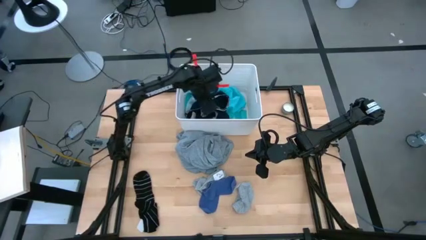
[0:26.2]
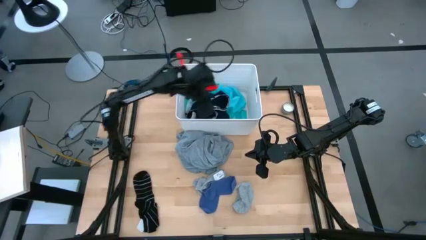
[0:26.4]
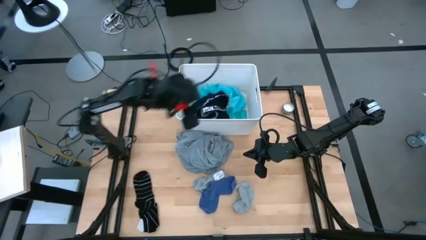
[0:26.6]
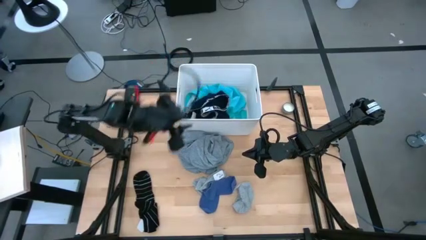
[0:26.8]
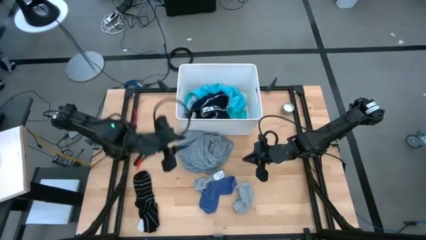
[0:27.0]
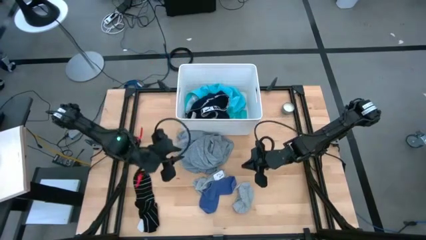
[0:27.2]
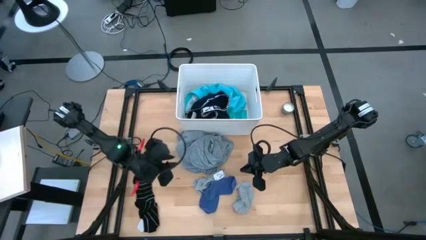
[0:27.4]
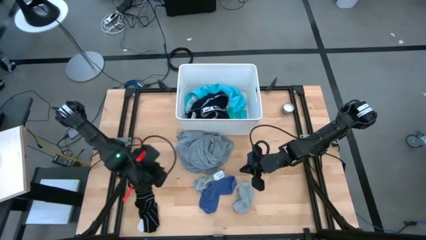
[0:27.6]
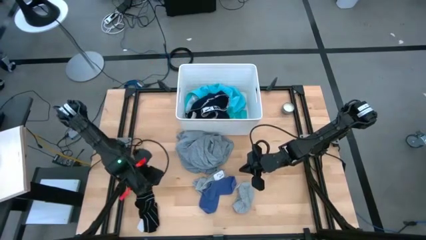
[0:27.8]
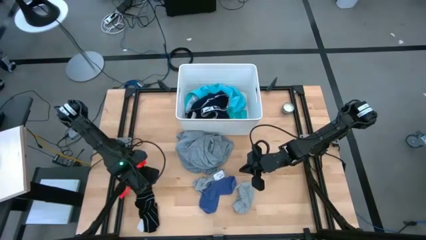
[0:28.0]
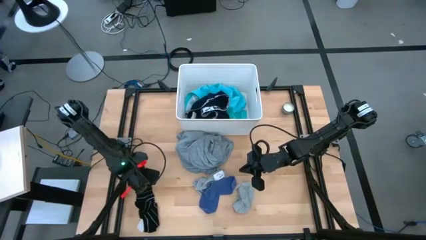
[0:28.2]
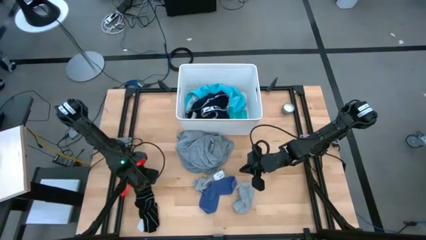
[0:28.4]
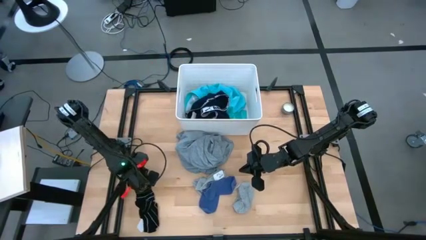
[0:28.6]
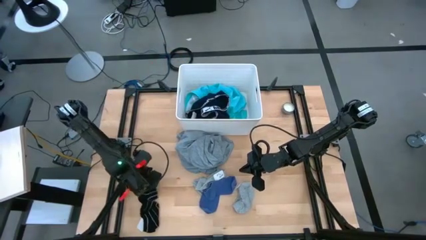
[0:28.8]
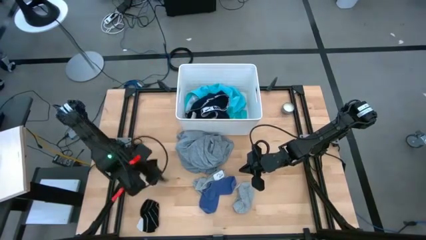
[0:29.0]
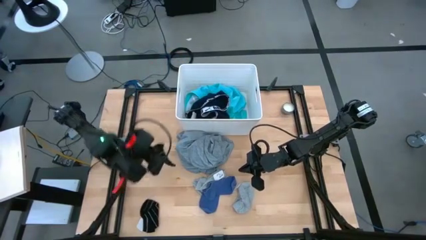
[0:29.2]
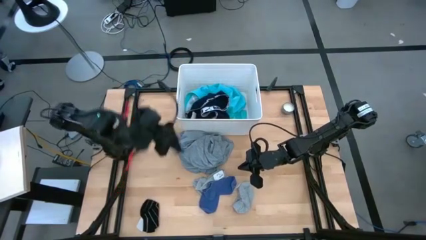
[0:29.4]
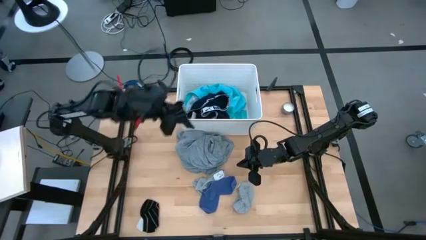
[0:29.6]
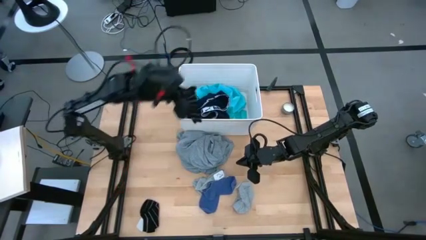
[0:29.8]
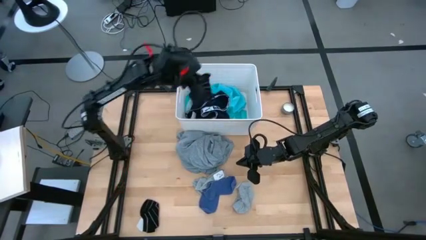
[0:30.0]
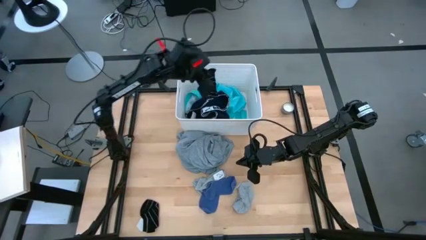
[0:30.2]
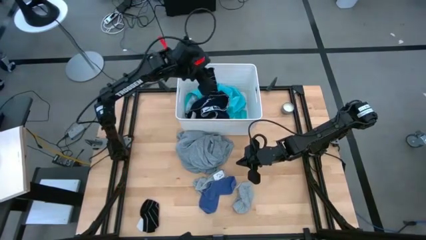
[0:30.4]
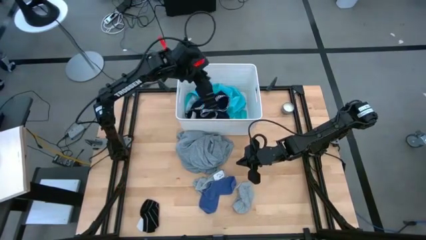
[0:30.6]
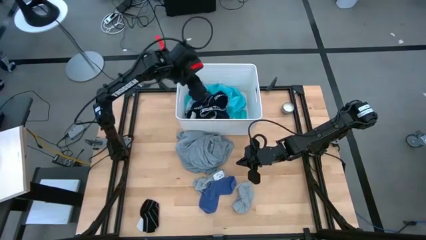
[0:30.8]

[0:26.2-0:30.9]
Task: Sort clothes
Put the black sock into the white laundry bin

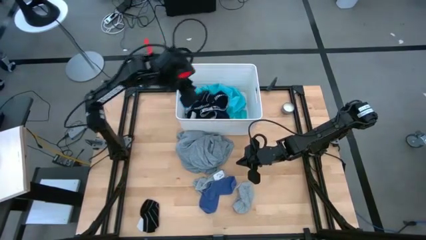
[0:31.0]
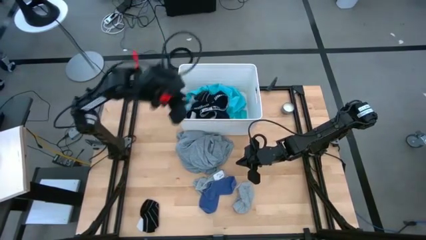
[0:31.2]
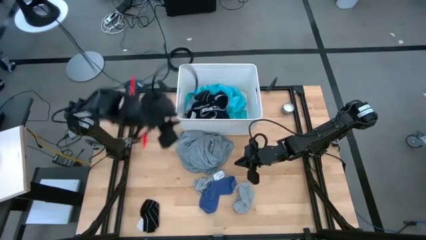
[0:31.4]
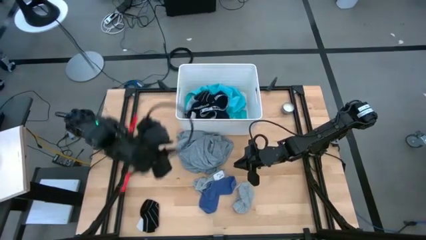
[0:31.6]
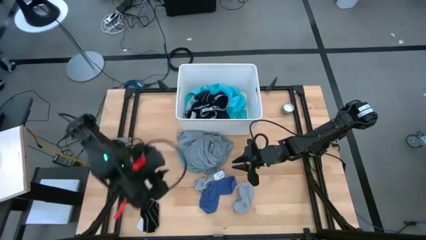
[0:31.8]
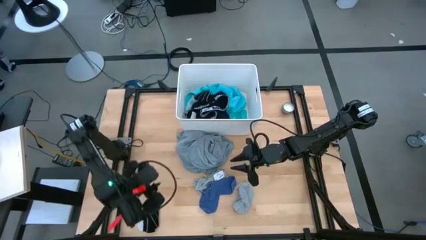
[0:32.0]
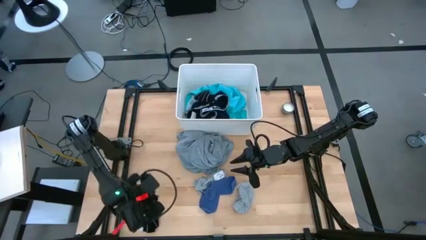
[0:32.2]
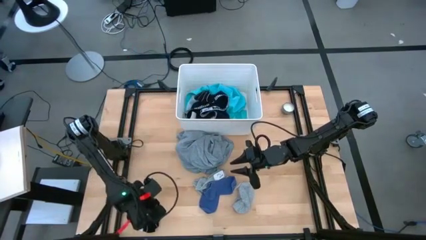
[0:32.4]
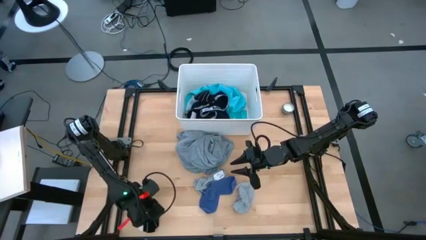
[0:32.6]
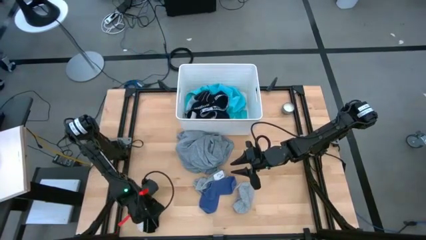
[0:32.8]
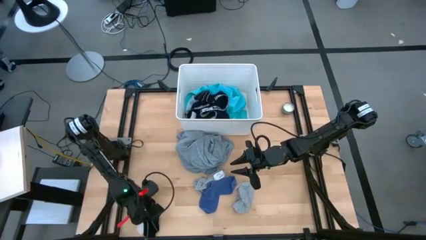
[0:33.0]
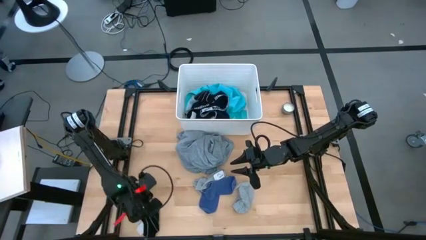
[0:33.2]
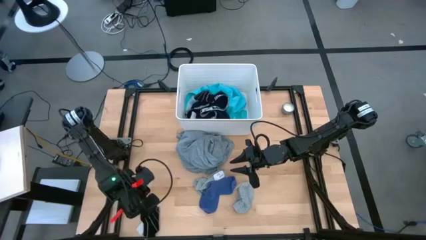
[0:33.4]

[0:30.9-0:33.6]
Put the black sock into the white laundry bin

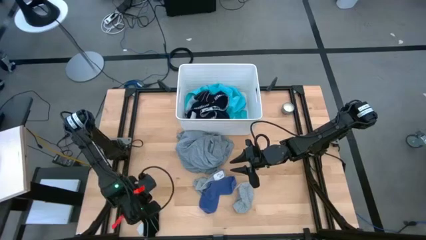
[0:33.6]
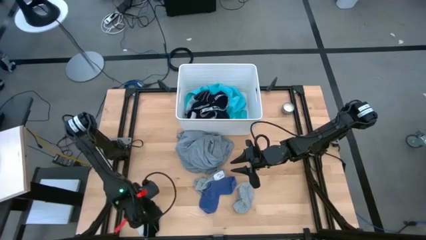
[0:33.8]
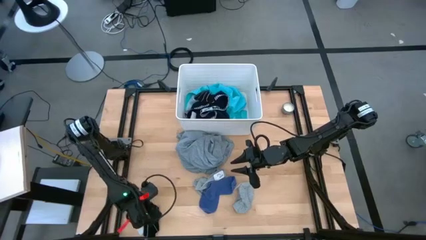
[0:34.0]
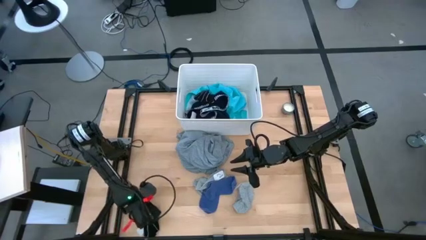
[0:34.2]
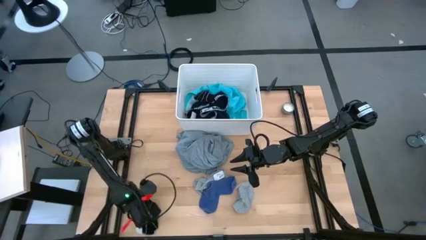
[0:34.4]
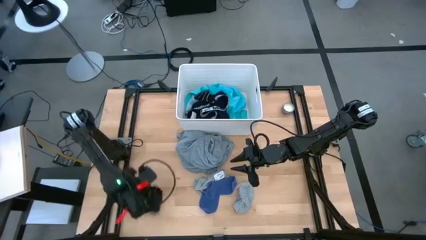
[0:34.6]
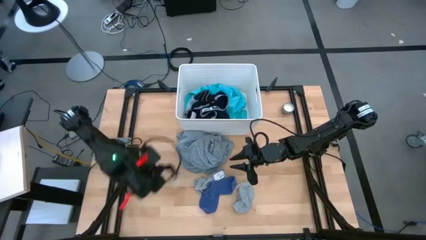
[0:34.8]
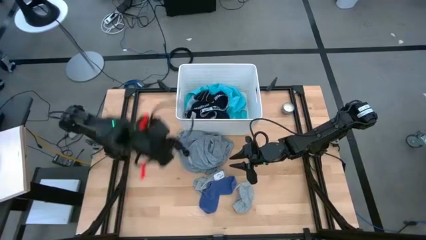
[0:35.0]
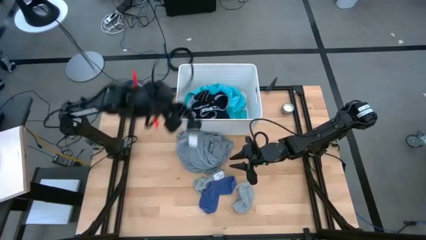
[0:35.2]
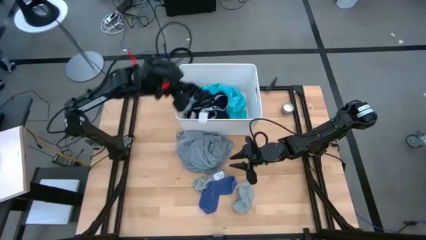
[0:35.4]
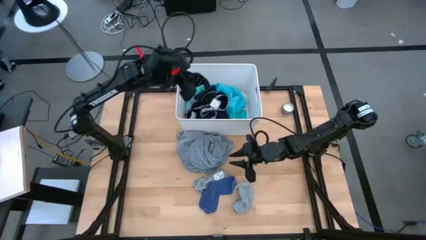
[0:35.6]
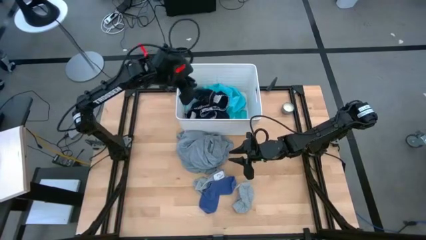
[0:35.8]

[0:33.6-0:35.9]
Put the black socks into the white laundry bin

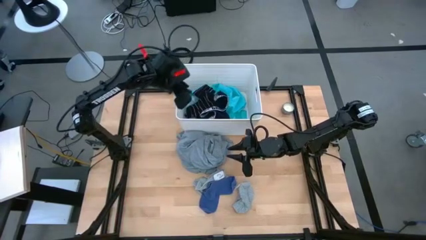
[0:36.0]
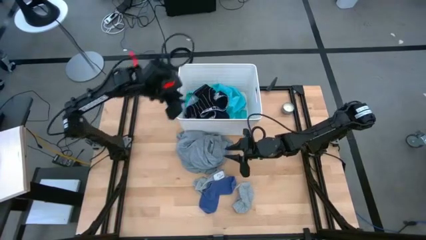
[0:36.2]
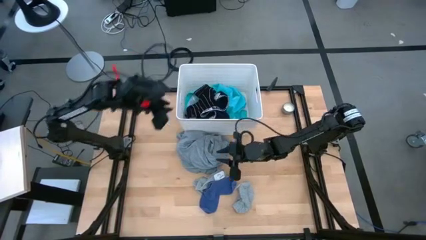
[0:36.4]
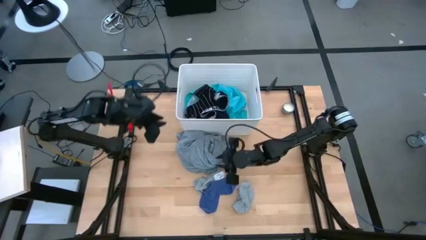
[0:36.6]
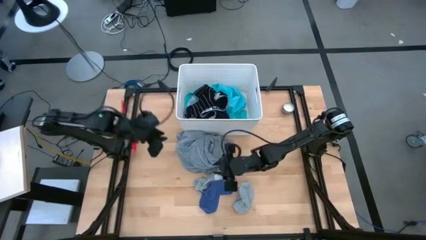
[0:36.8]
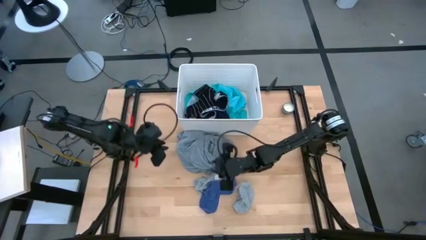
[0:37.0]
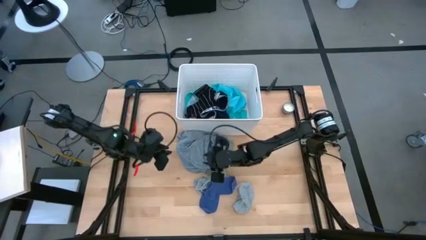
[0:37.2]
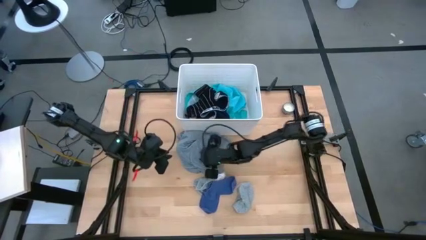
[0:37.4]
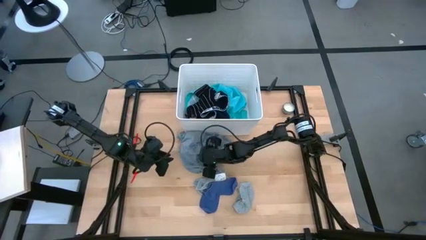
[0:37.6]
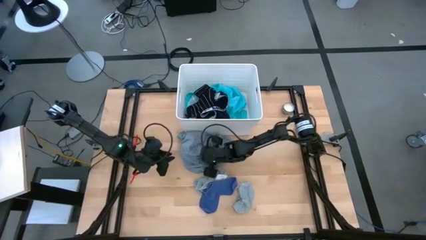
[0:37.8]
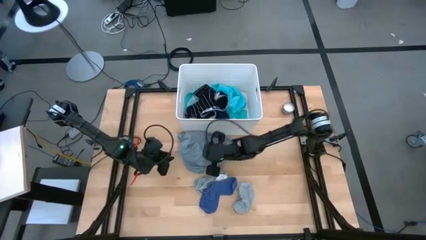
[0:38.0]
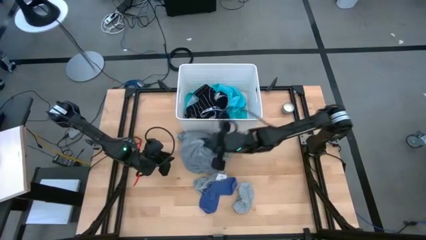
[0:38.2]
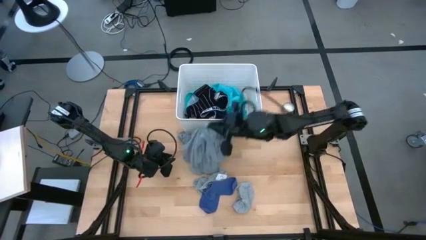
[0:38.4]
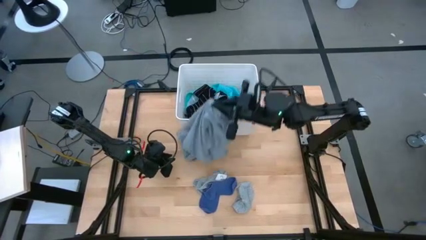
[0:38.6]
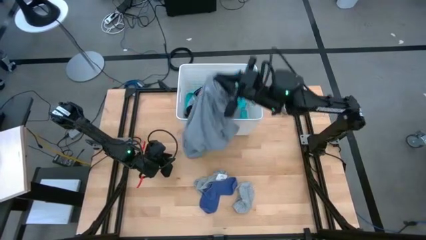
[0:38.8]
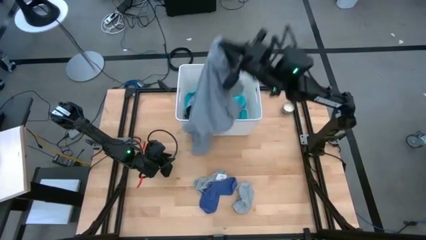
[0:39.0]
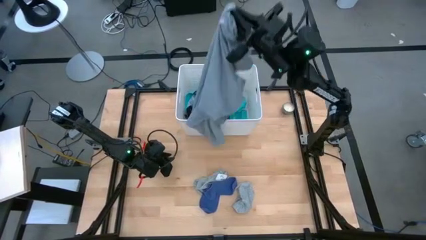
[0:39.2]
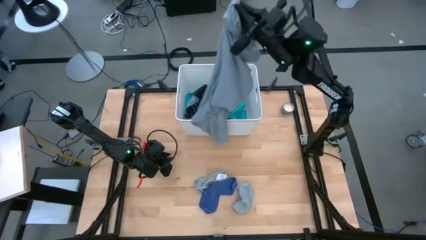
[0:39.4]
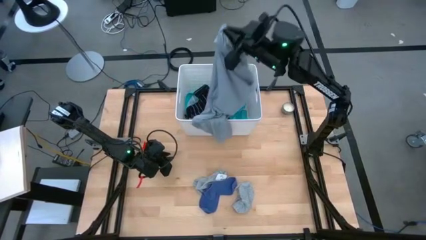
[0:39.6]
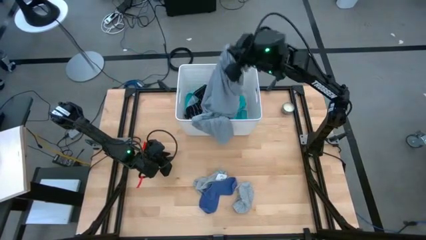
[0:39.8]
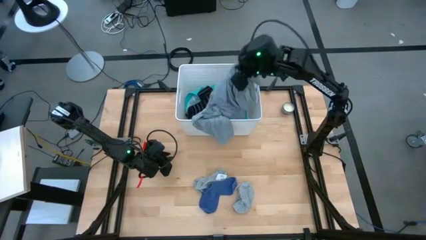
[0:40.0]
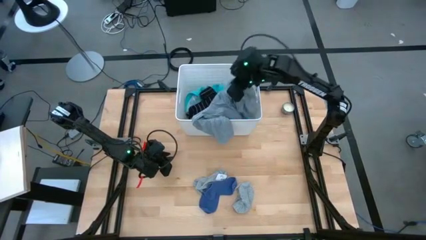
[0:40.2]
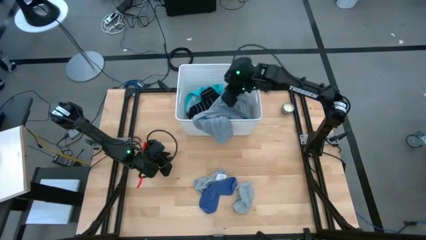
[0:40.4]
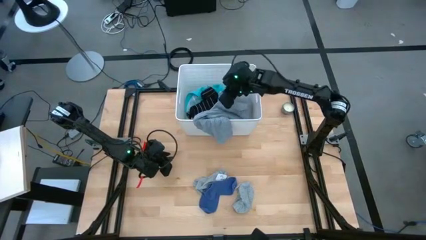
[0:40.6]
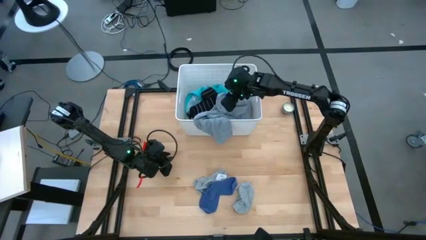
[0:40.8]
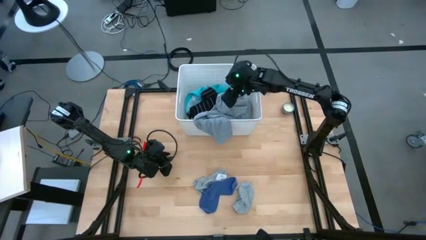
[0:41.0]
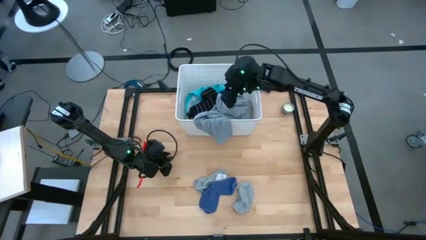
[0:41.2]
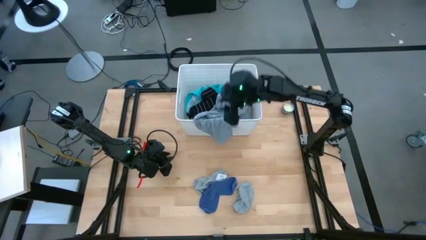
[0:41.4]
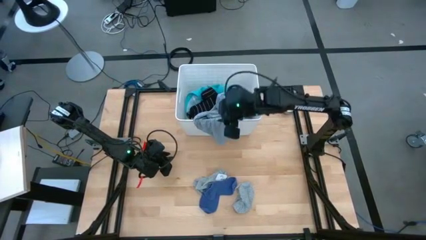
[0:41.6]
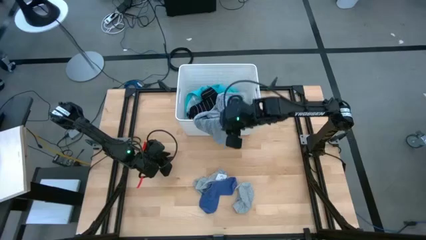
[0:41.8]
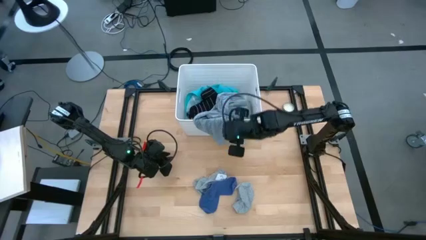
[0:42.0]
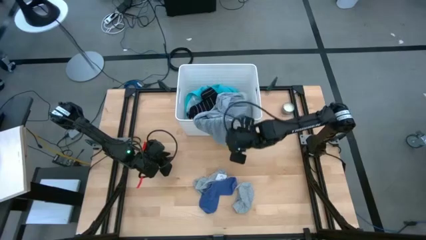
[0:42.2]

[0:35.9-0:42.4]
Put the gray shirt into the white laundry bin

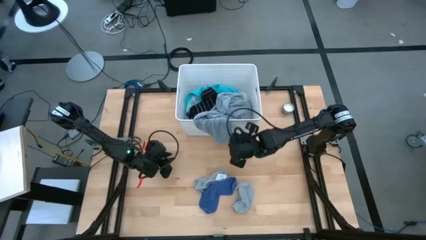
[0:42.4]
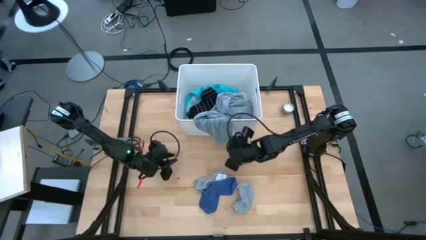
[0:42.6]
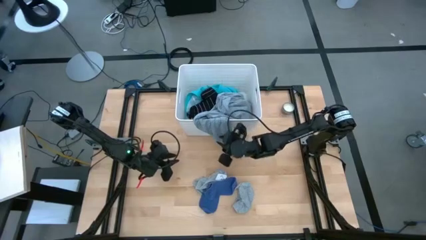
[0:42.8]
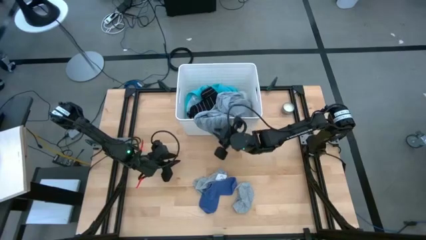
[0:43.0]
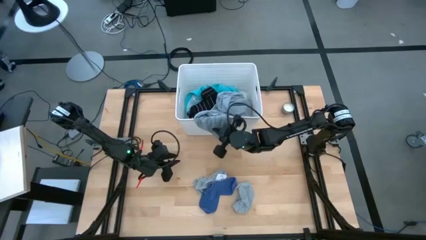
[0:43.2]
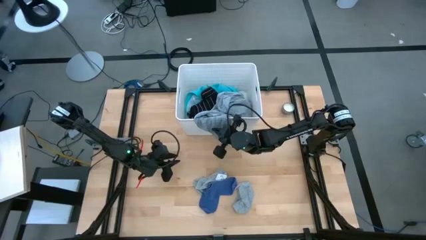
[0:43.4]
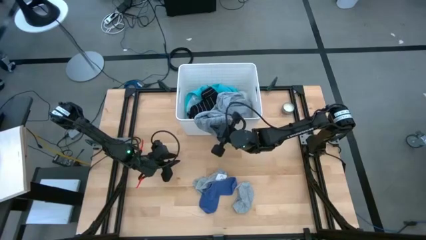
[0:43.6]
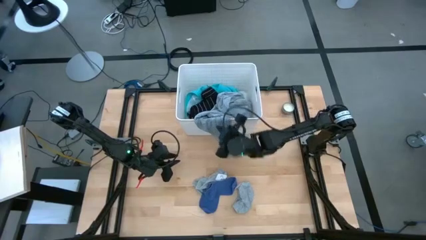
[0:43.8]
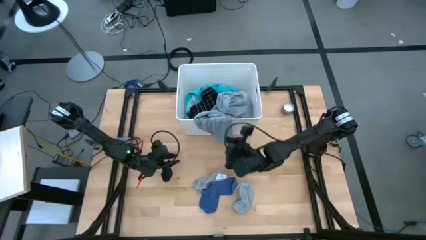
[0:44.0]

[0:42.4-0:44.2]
Put the gray shirt into the white laundry bin
